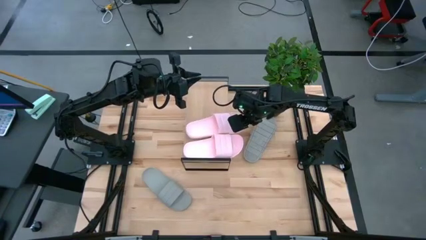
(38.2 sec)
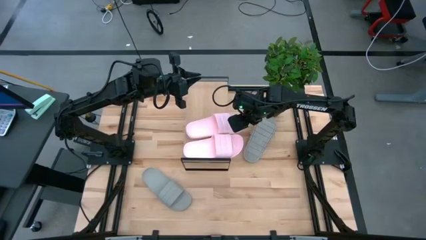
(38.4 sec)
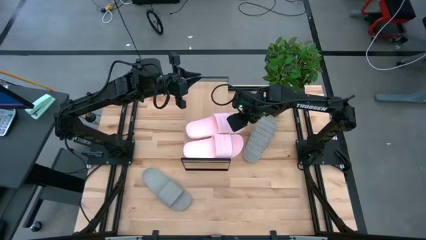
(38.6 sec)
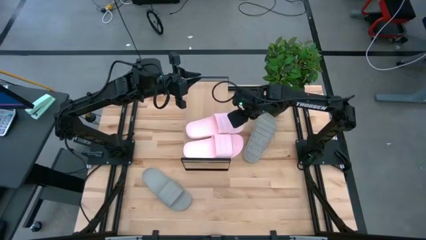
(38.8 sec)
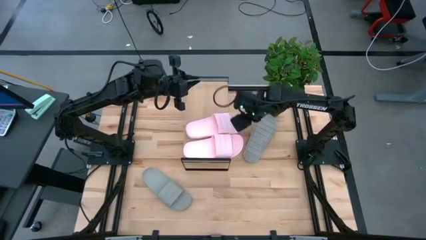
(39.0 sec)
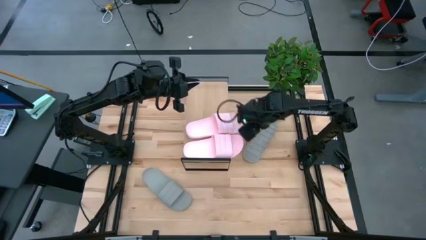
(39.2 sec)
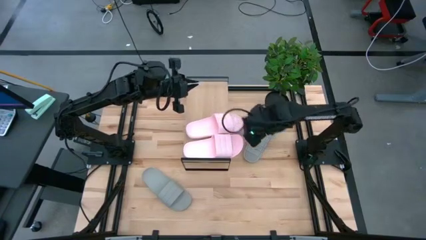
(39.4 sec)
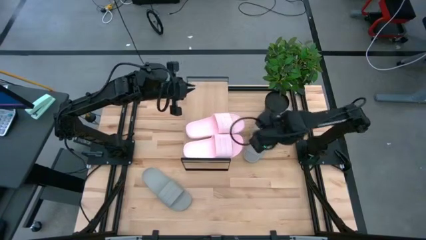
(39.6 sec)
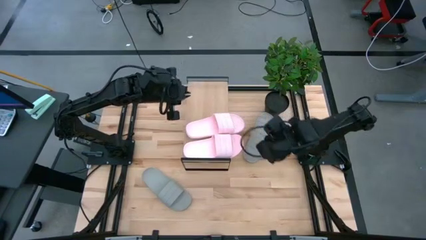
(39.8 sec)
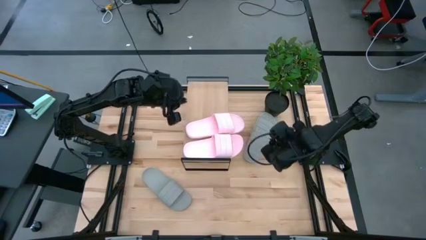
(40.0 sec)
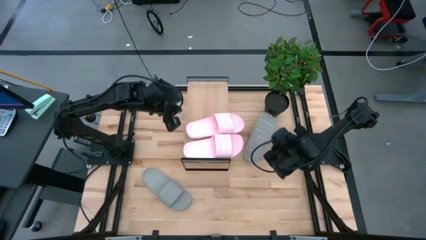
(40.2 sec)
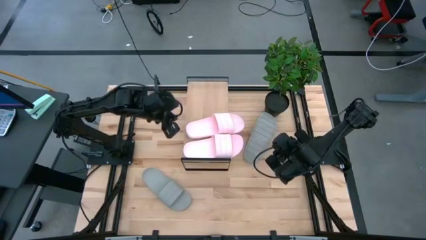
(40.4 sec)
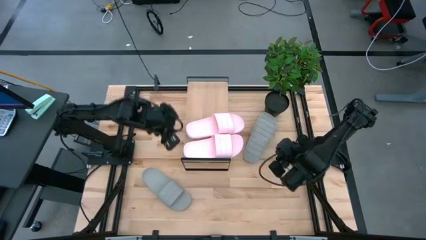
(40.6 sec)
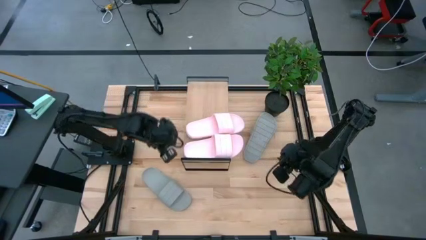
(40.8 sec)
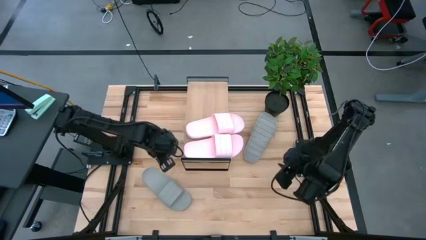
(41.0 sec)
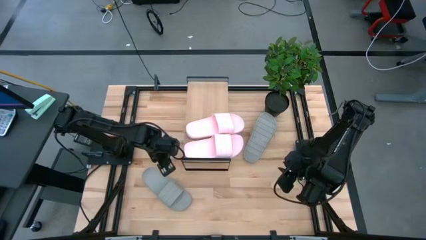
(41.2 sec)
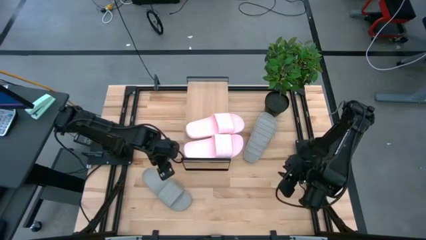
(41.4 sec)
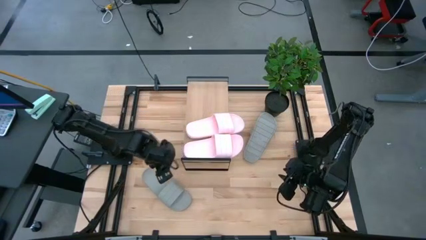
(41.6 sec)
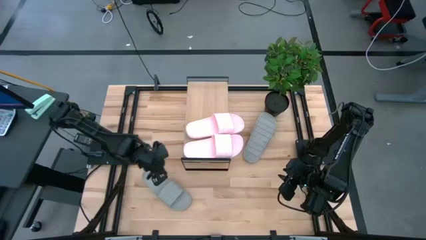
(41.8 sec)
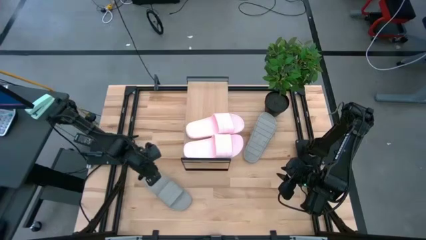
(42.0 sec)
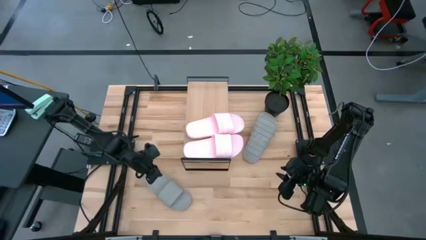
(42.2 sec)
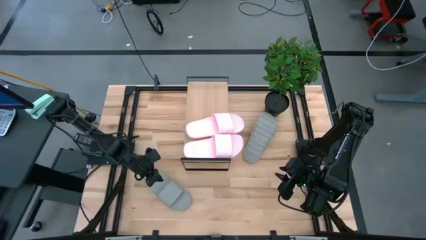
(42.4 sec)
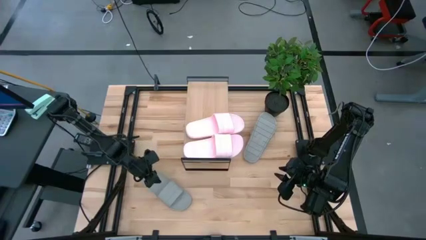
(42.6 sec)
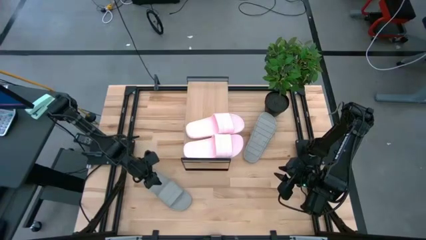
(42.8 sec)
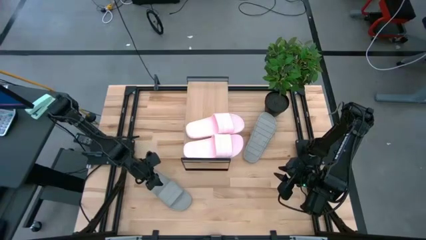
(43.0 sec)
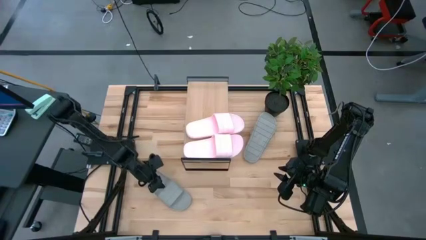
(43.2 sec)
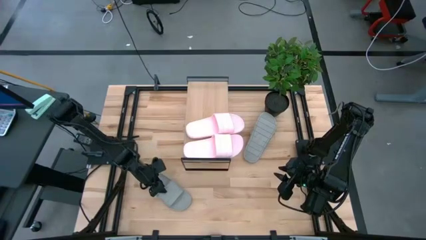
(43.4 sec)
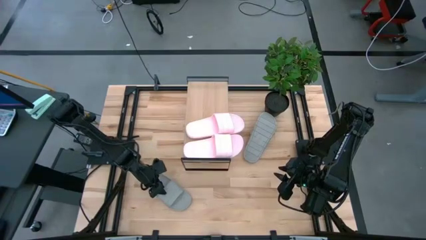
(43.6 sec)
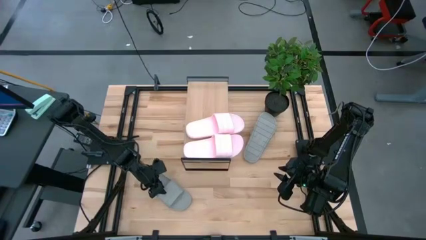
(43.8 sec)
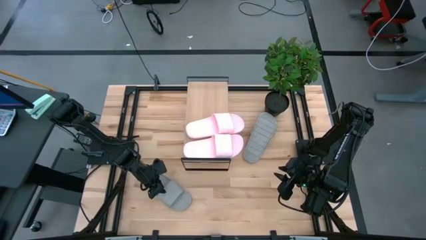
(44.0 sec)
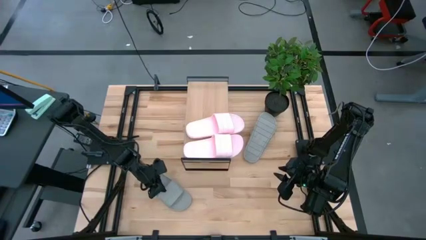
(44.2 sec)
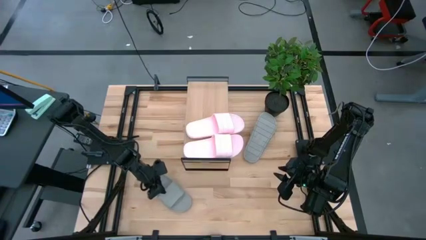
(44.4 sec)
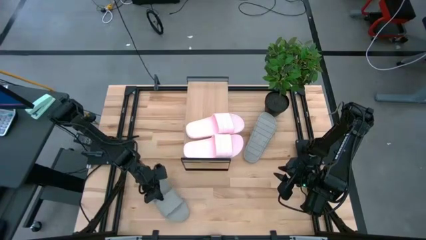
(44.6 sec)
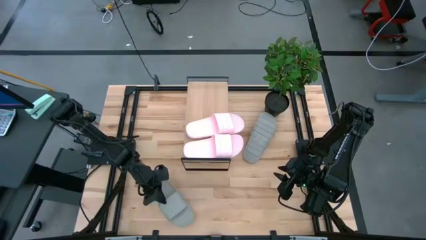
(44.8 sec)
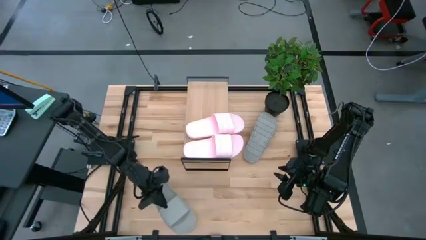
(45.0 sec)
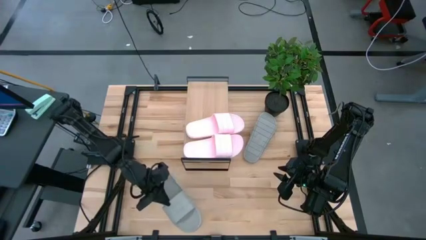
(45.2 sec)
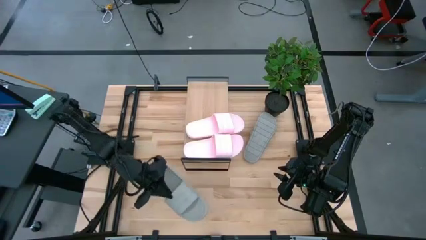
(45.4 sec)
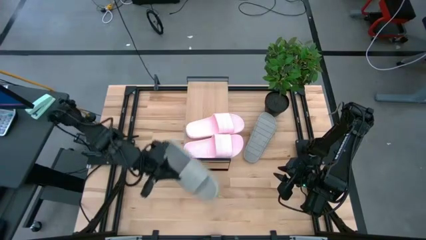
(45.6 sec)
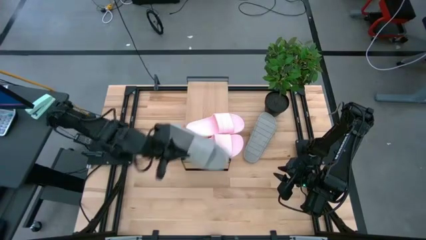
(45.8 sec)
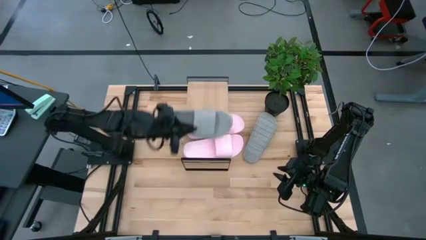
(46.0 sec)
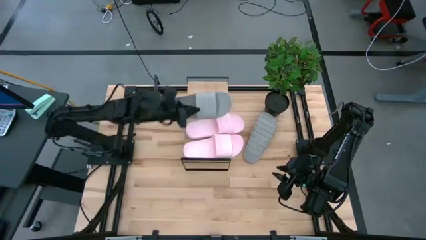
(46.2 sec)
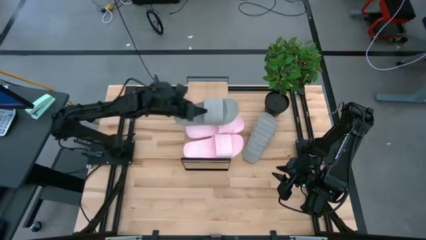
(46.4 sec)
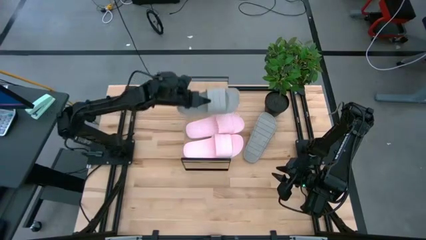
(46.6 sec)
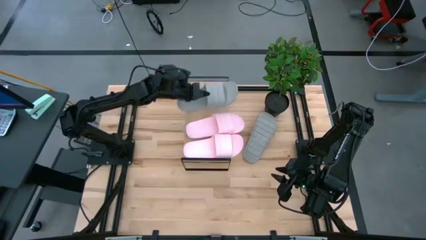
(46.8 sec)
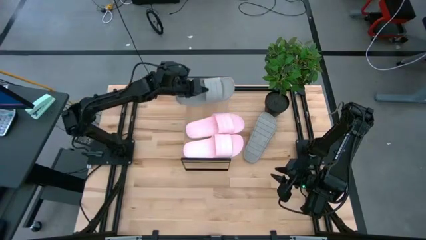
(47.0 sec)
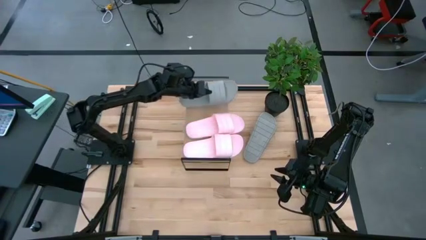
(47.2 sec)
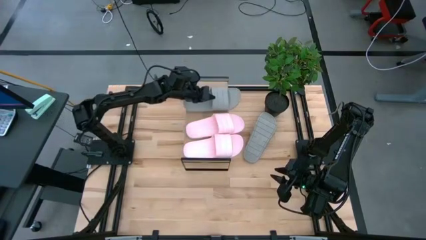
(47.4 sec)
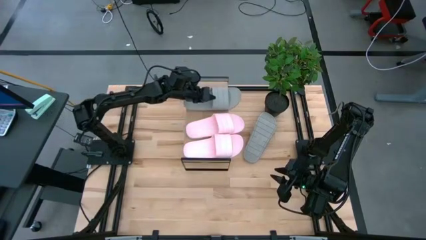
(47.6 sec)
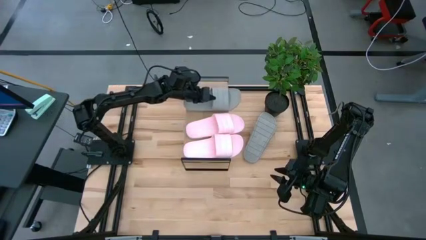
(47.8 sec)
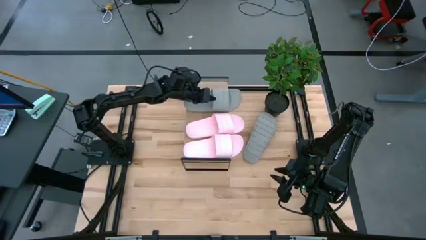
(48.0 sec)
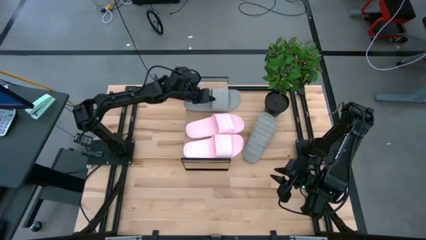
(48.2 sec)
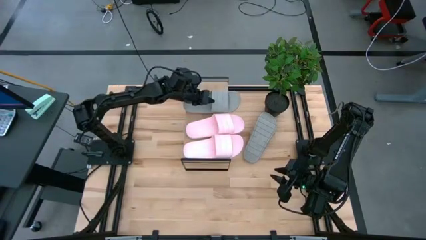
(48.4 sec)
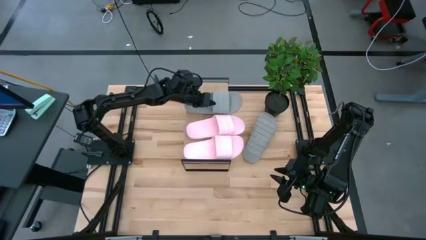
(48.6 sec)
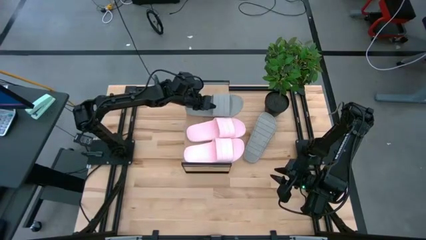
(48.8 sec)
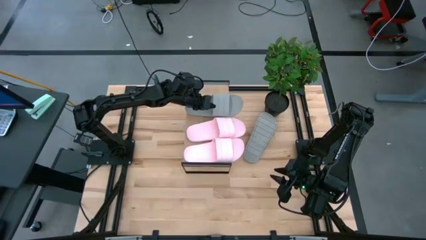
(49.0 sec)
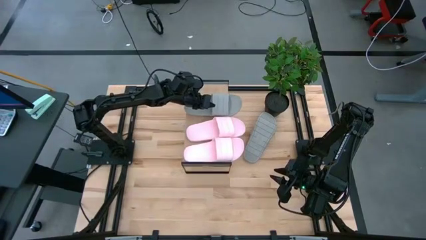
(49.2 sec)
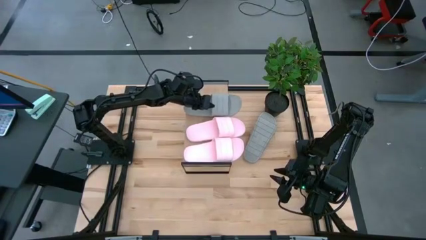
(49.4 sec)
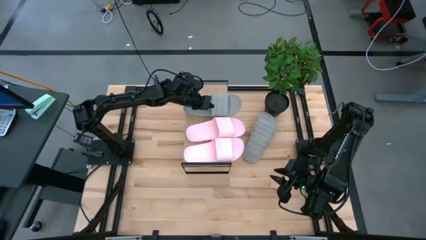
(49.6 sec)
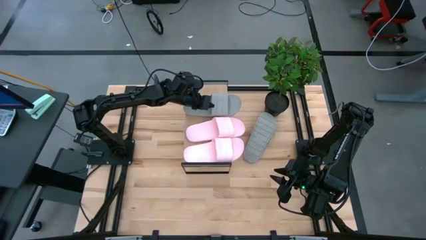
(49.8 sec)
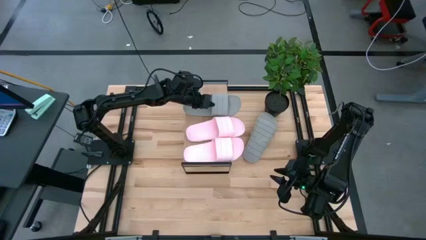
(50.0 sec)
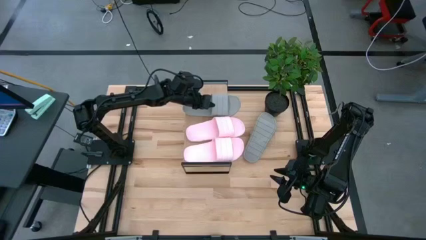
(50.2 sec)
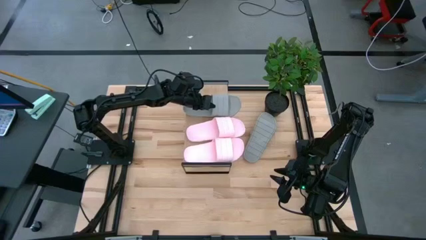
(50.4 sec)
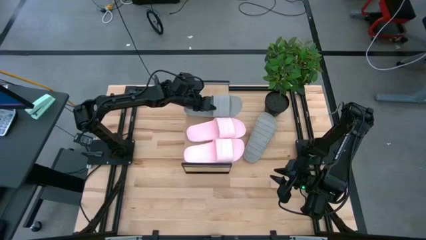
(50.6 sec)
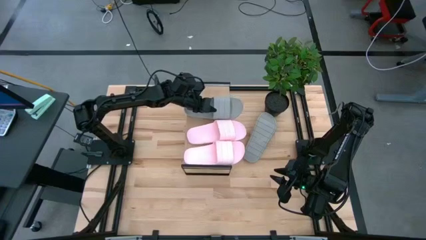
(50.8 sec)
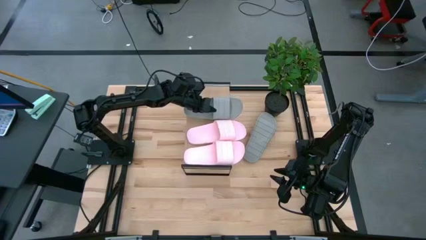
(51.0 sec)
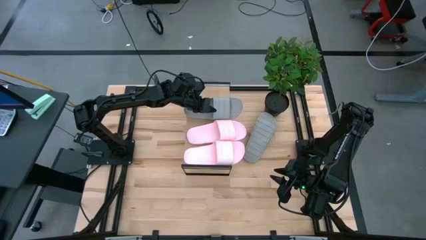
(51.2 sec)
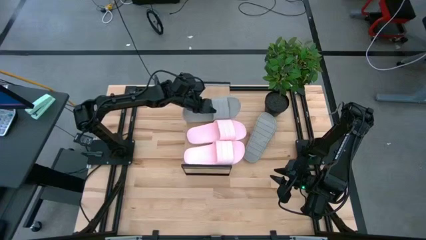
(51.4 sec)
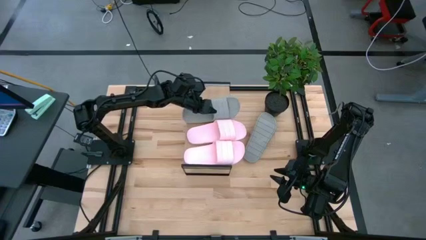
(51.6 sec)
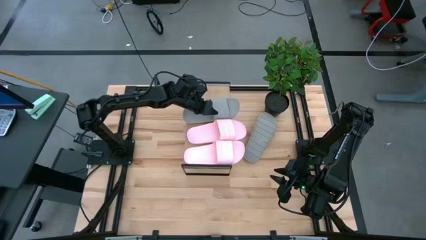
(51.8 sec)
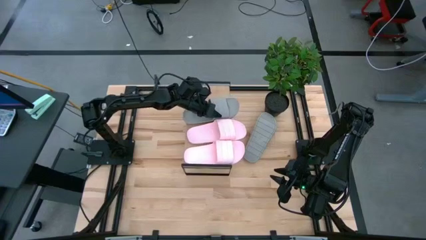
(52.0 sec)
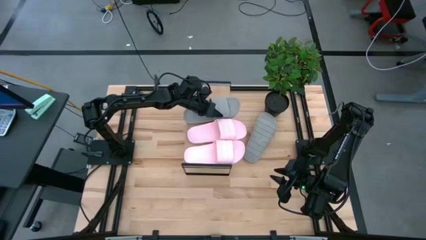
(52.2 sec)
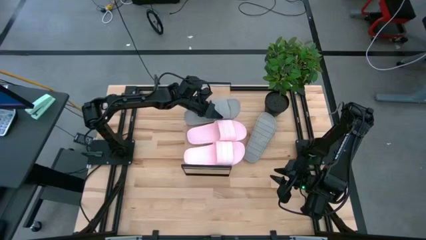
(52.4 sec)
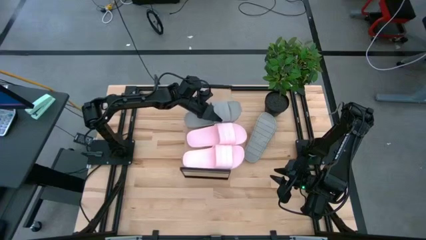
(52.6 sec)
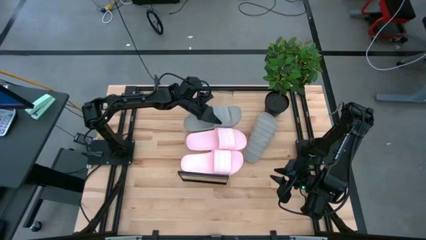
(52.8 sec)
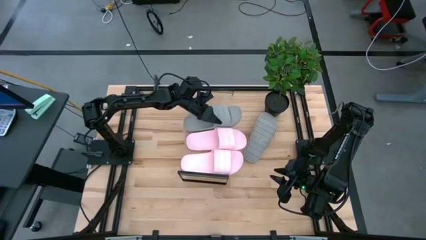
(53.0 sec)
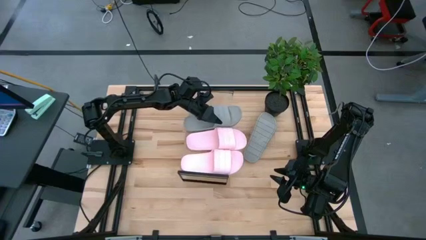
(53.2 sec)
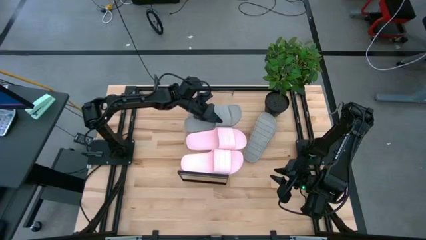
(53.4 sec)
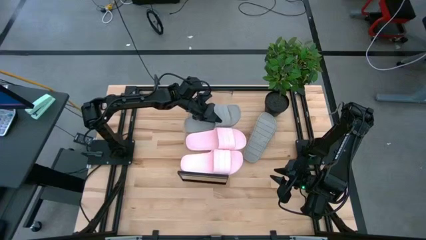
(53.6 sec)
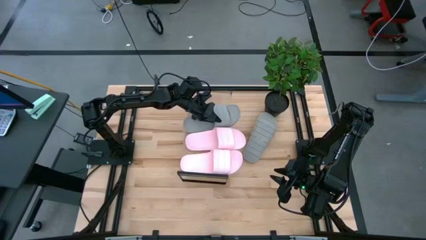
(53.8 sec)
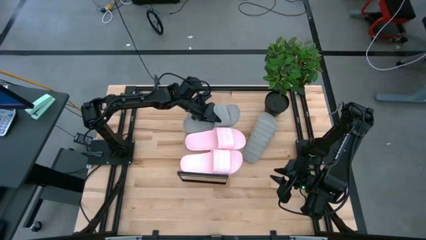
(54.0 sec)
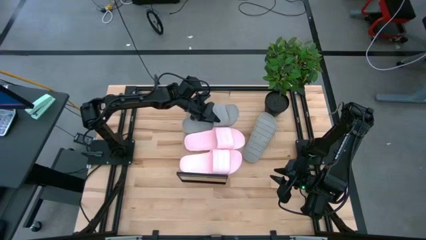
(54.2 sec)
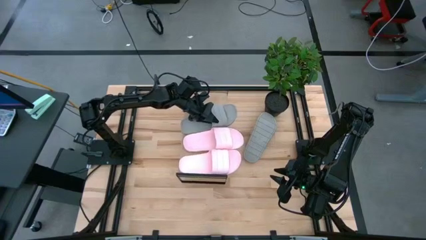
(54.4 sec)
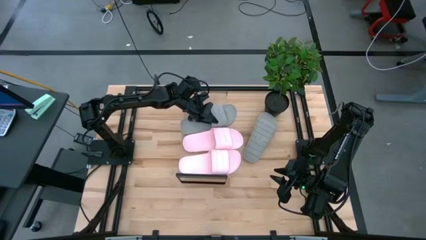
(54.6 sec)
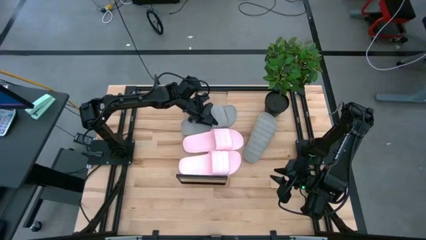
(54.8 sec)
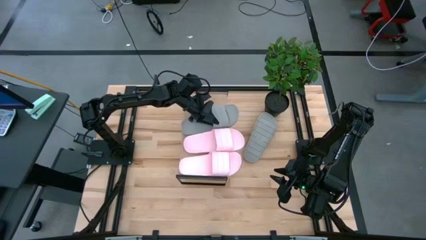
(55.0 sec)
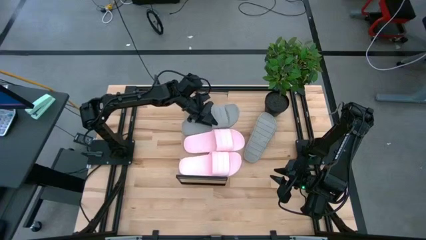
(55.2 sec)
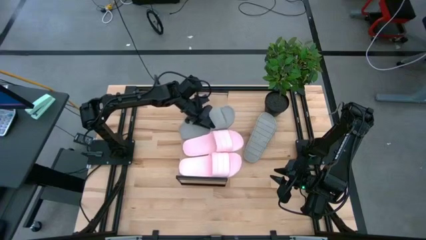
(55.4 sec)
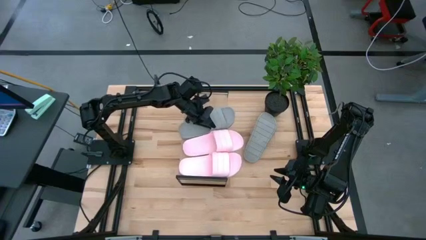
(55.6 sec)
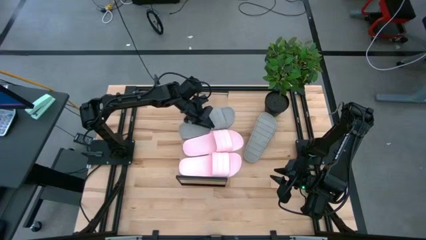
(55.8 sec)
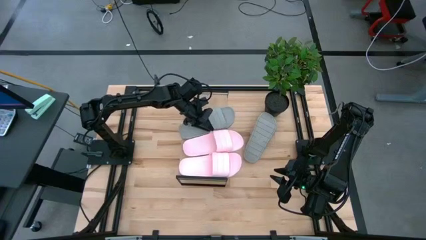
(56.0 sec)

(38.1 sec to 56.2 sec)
Task: Pick and place slides into the shelf
Put the bottom gray slides on top of the shelf
